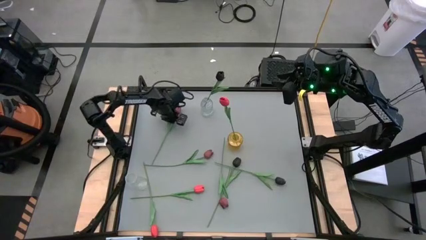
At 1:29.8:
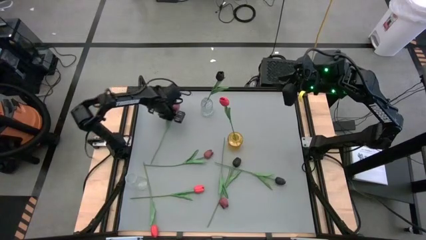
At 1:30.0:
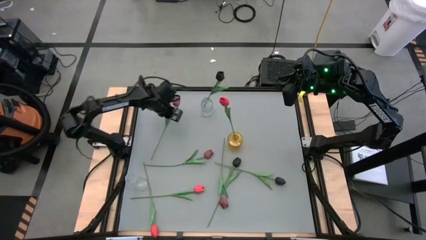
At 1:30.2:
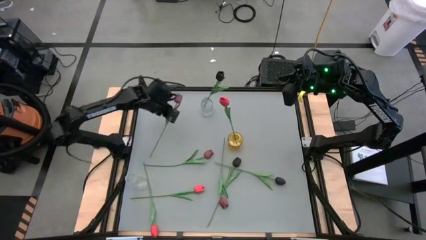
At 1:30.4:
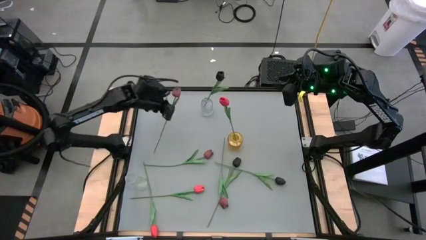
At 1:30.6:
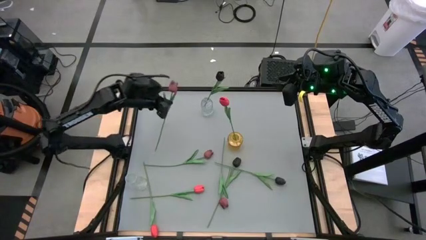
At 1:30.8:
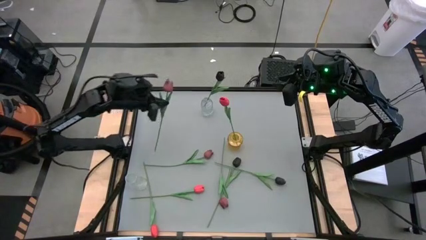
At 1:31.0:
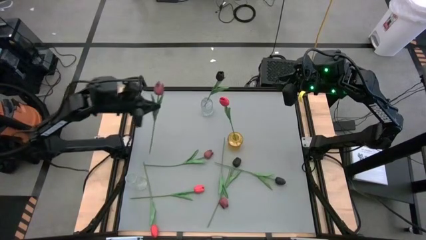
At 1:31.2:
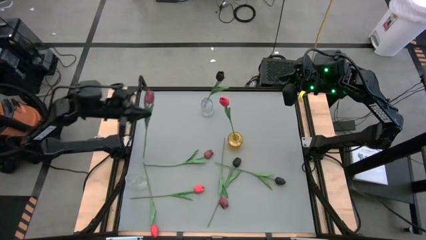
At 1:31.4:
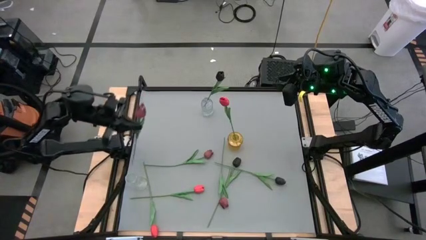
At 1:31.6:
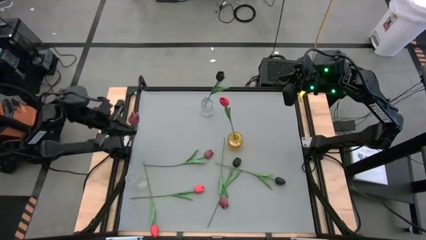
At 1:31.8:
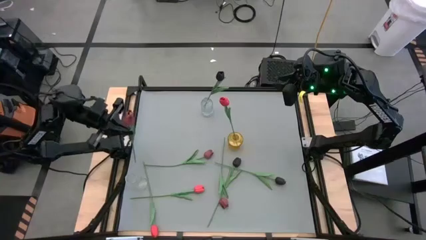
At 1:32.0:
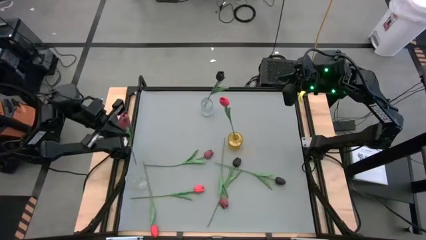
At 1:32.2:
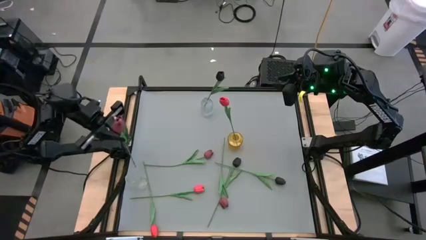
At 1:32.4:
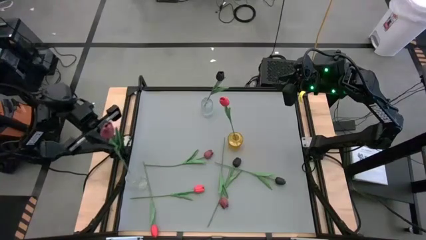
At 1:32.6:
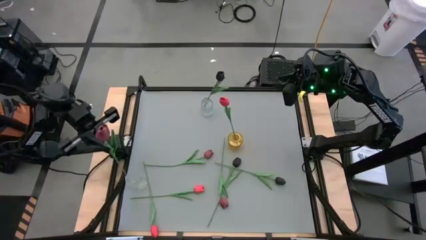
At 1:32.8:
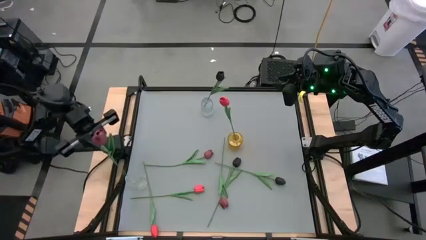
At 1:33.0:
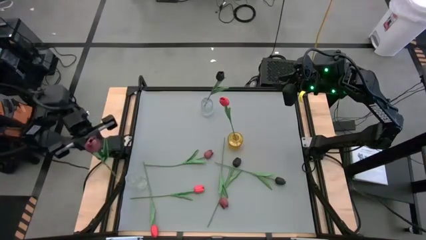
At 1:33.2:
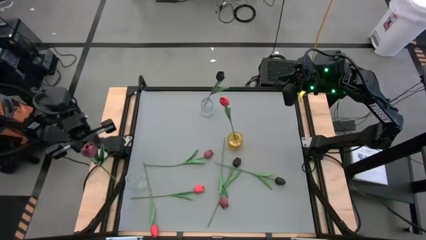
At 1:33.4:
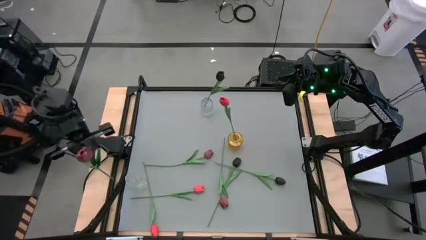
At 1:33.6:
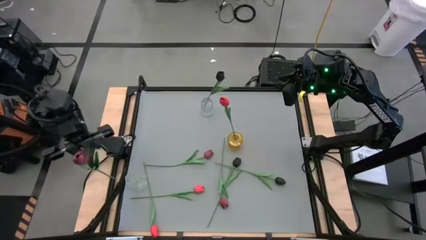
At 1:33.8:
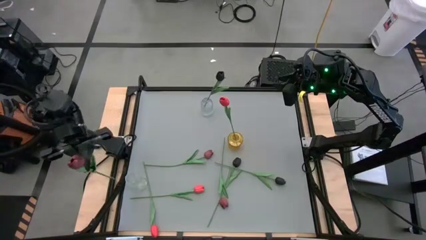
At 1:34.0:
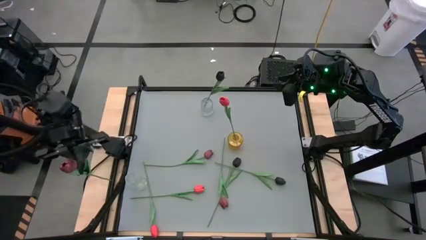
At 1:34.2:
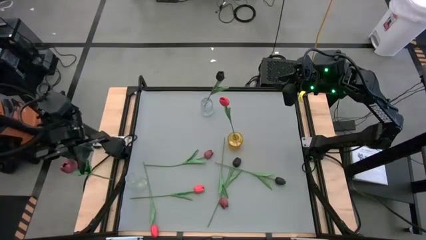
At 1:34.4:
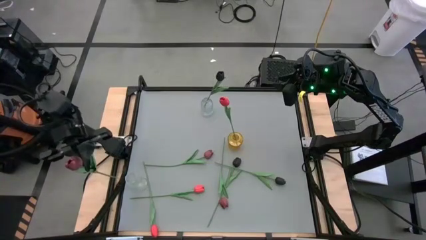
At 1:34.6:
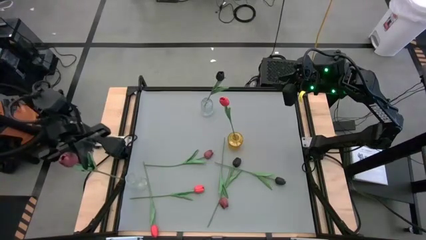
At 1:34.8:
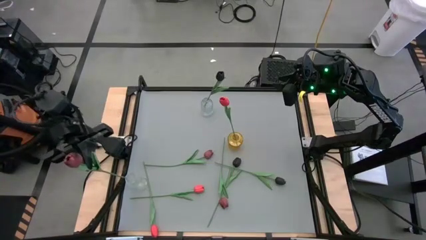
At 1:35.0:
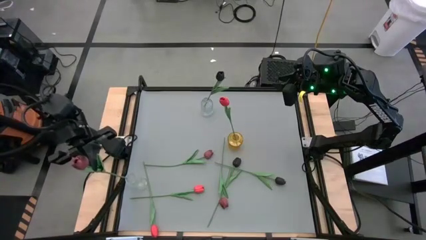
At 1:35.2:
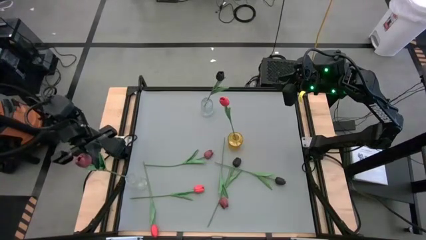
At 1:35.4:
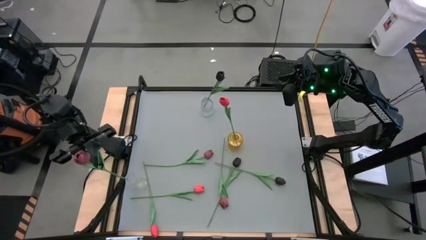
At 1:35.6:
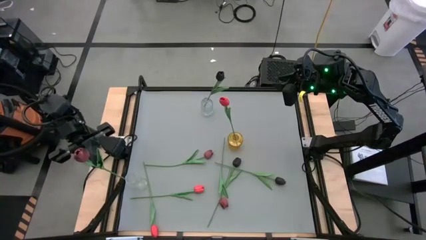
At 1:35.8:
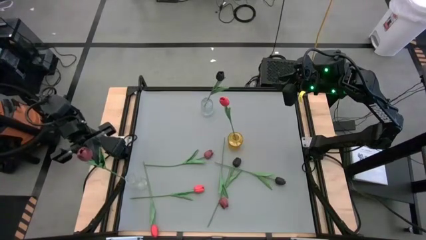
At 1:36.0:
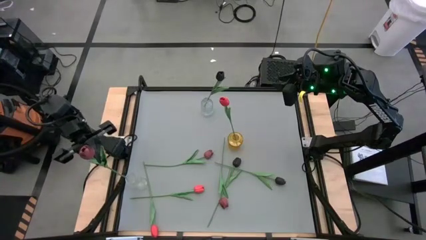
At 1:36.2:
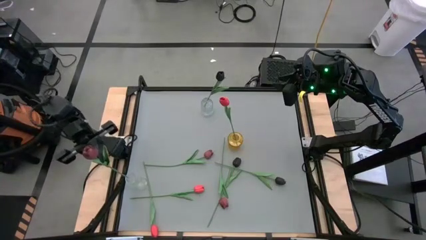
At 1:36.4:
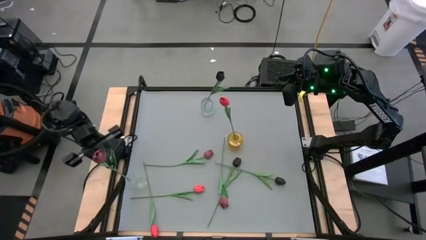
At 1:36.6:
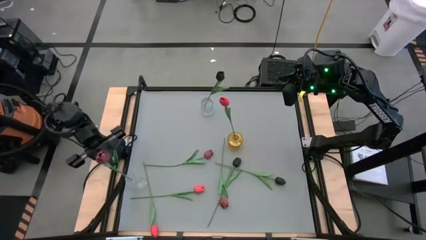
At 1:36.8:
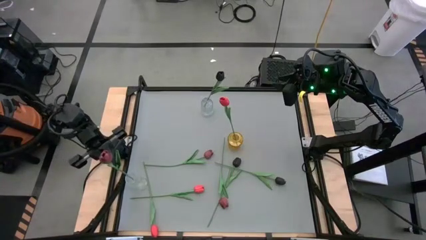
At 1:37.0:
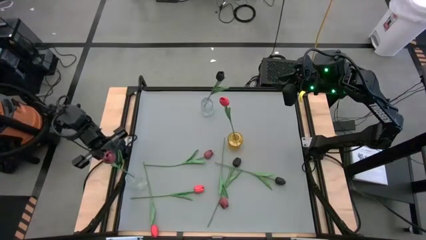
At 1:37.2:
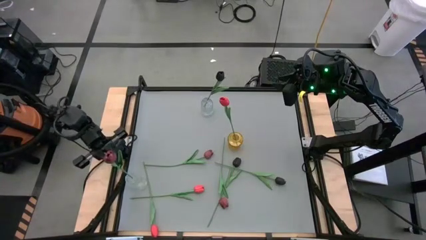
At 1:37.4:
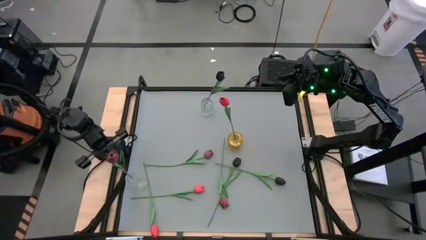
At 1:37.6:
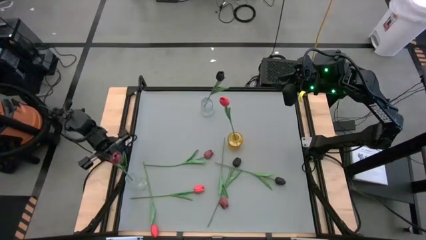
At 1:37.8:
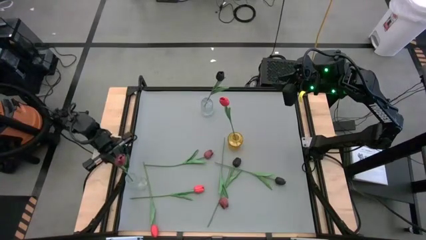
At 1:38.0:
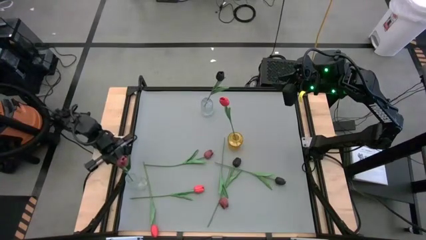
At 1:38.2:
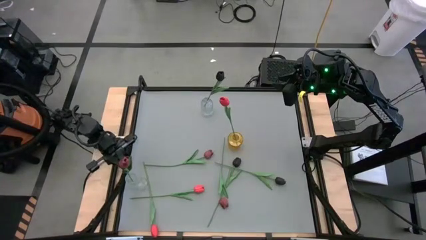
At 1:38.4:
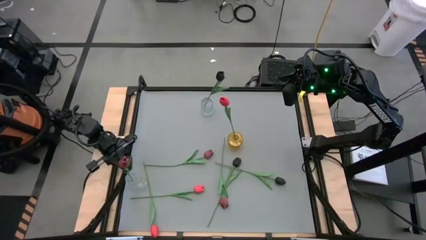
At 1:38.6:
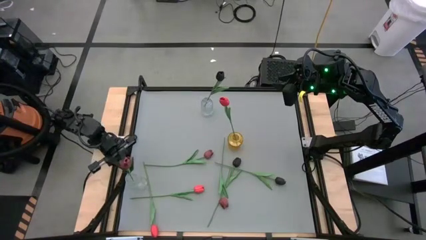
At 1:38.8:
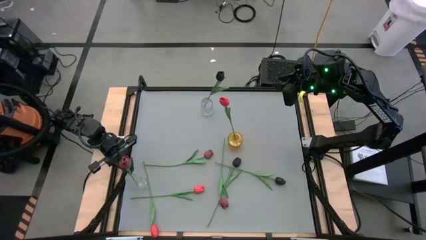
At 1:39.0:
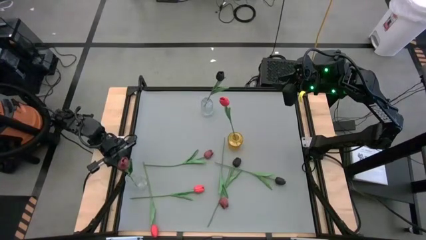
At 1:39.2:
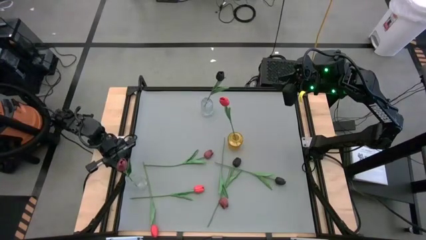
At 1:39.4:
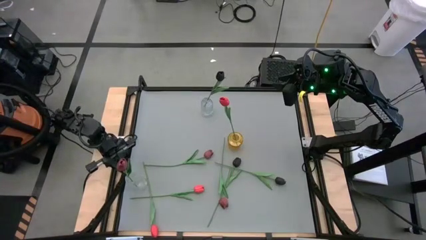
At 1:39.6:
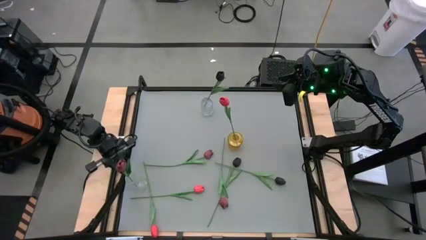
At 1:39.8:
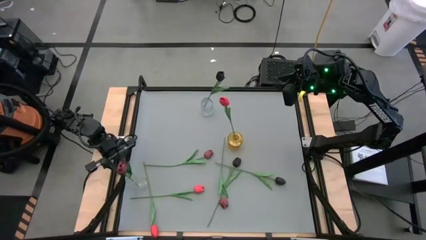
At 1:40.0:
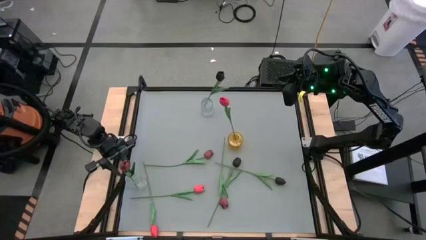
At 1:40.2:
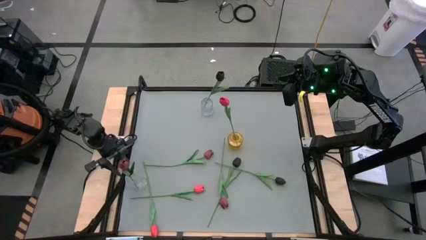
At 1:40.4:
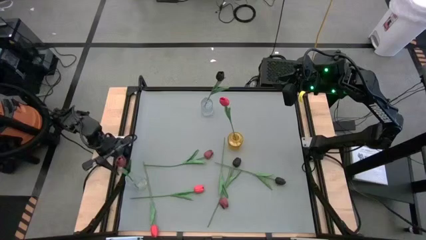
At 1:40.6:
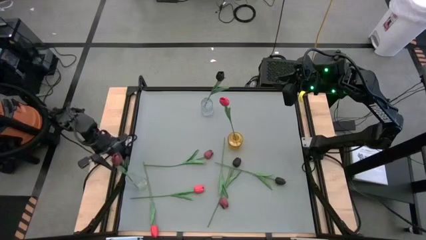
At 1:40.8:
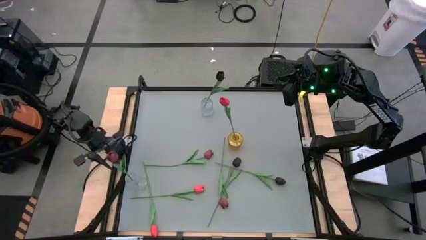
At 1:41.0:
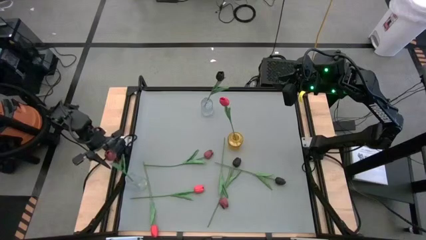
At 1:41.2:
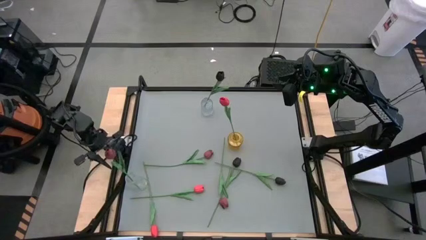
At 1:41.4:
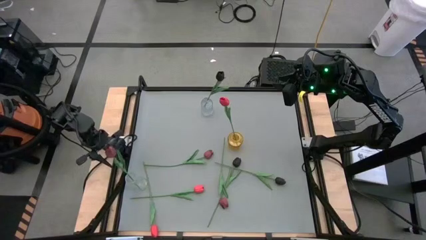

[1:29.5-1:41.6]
Task: Sort flowers into vase by color
Put the top red tulip into the bottom transparent vase

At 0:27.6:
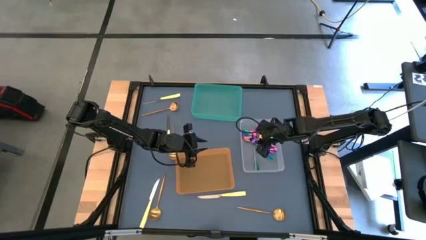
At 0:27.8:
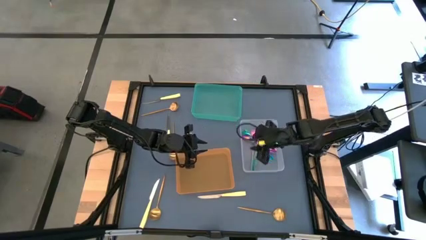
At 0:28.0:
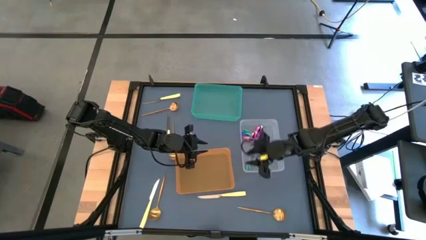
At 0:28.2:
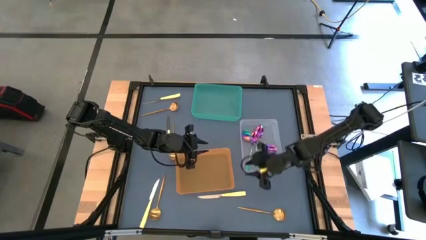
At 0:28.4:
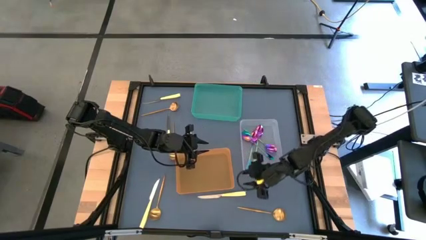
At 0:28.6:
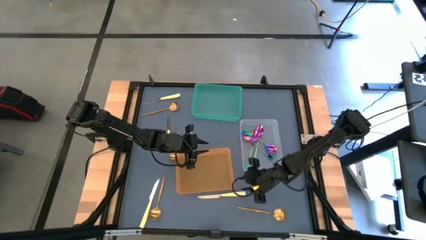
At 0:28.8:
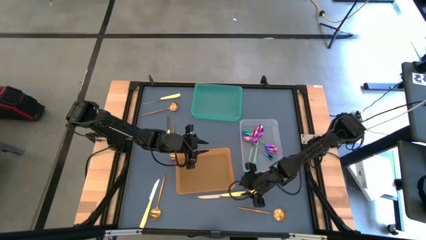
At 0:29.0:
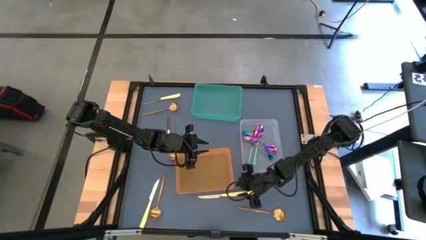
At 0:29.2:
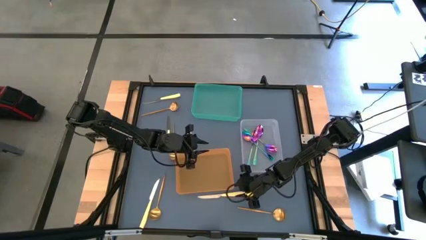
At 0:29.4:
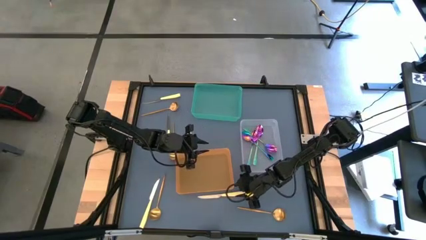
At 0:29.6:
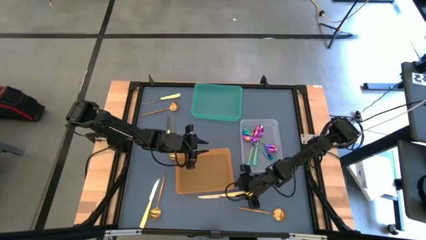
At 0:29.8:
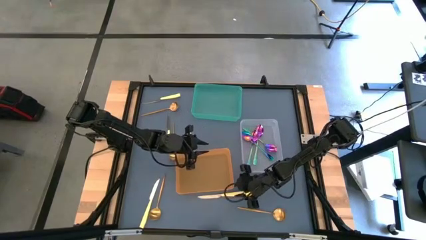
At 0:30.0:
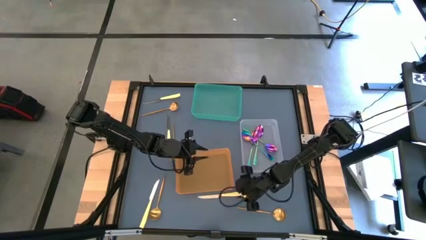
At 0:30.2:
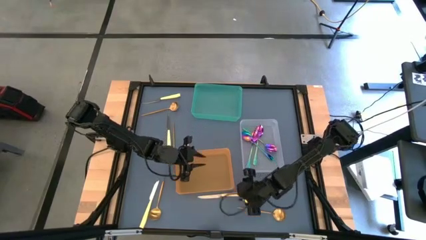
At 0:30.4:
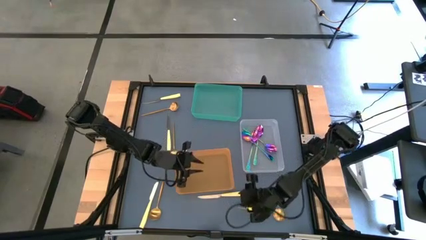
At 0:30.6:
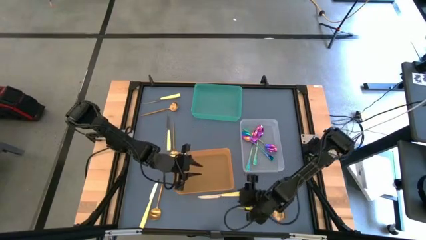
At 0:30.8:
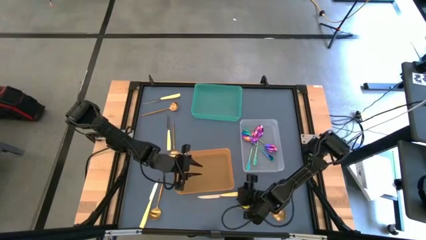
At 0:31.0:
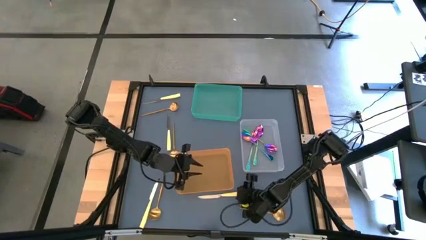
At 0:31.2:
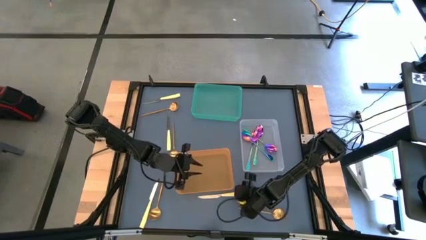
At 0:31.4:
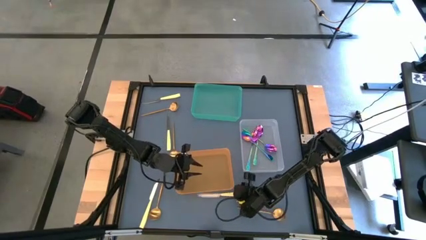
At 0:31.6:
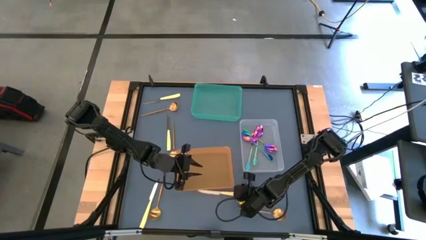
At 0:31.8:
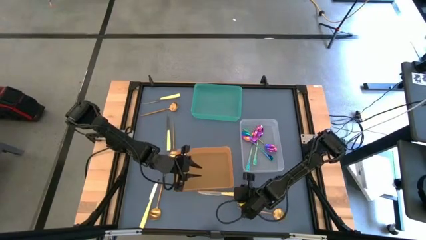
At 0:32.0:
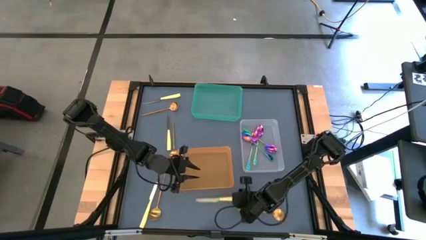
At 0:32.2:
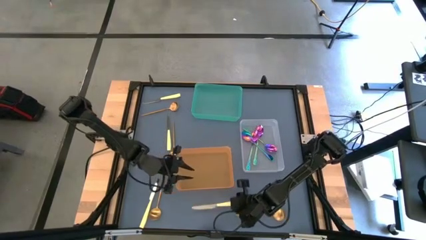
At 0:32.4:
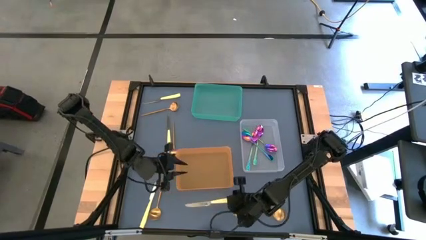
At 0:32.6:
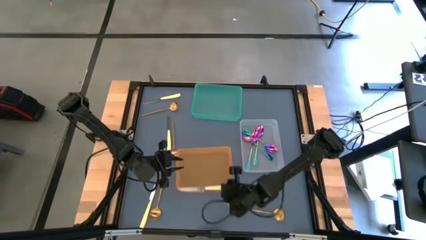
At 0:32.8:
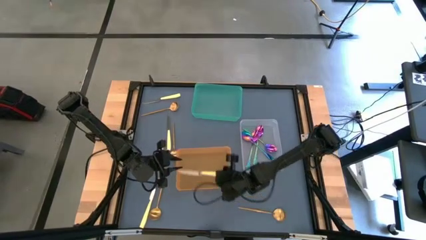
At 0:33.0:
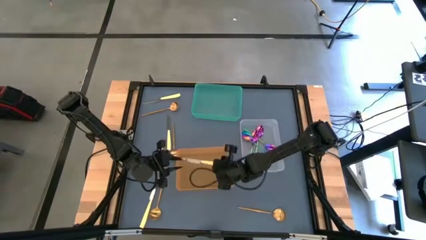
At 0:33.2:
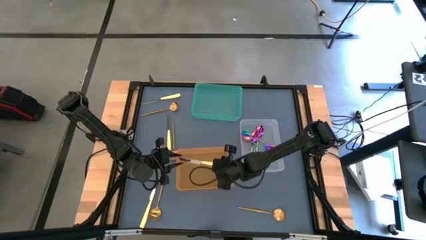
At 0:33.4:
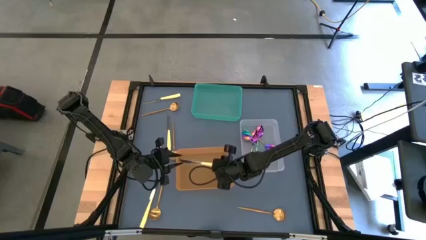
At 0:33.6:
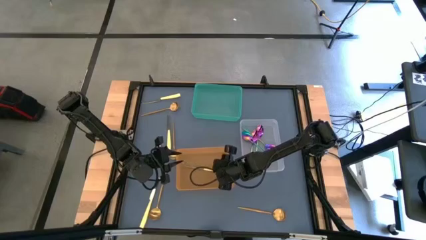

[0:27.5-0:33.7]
Task: Sort silverware by color (type)
Put the yellow table knife into the orange bin
